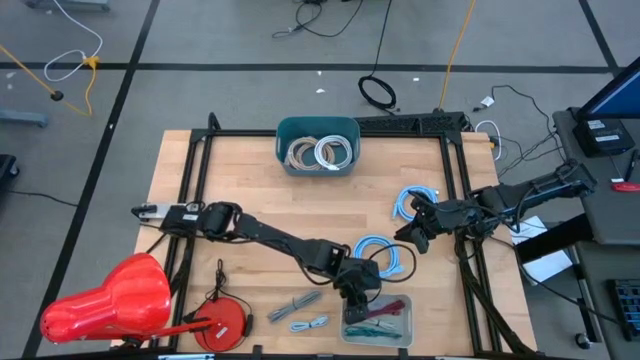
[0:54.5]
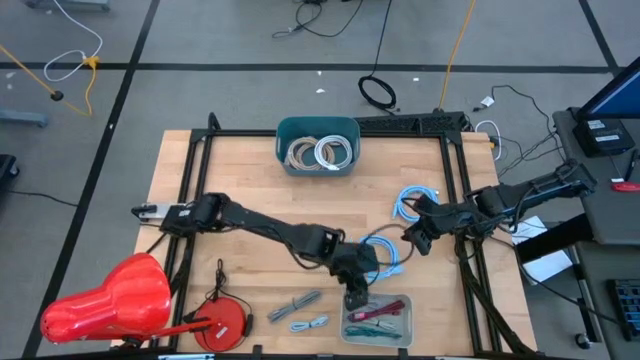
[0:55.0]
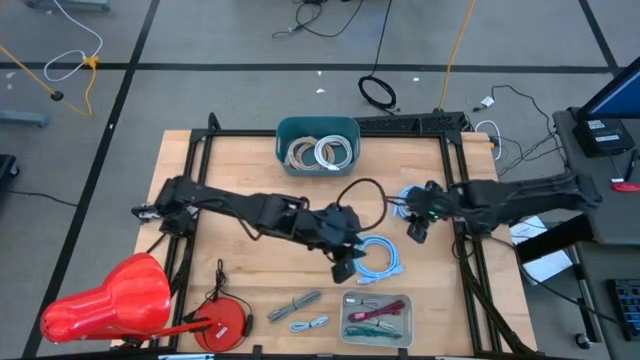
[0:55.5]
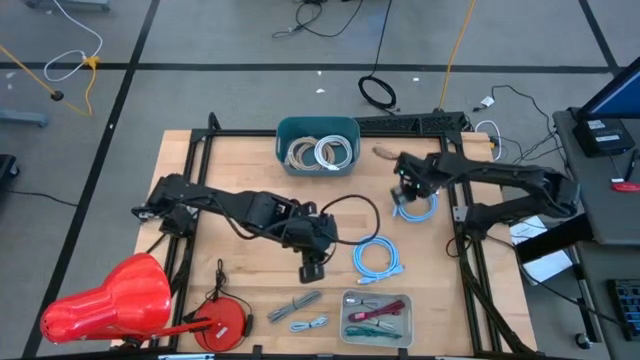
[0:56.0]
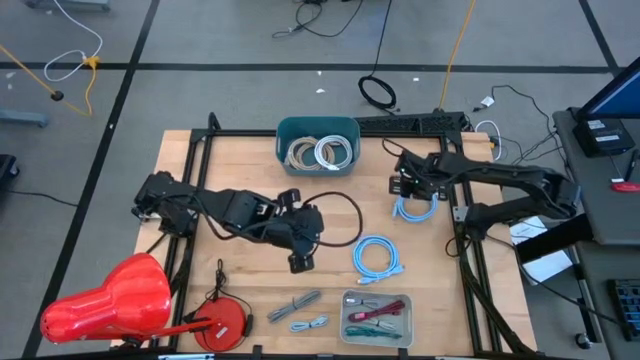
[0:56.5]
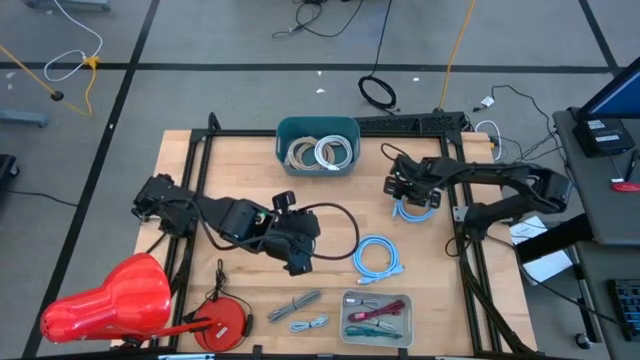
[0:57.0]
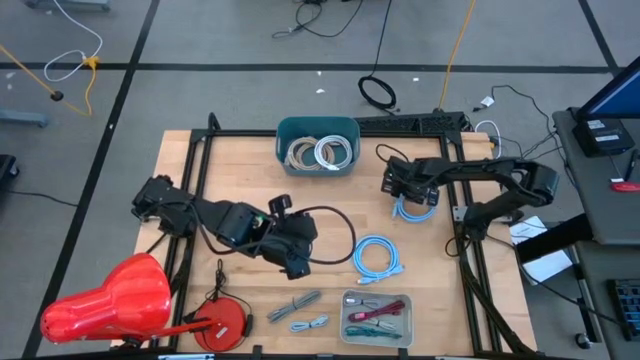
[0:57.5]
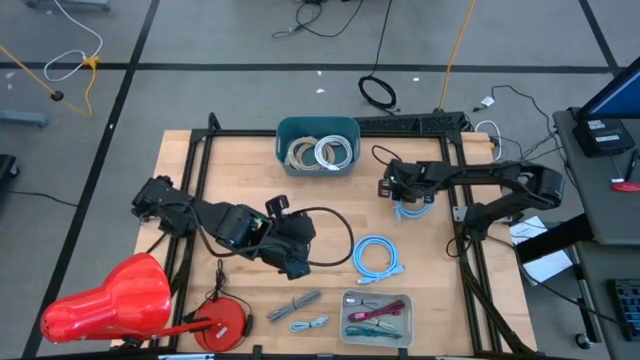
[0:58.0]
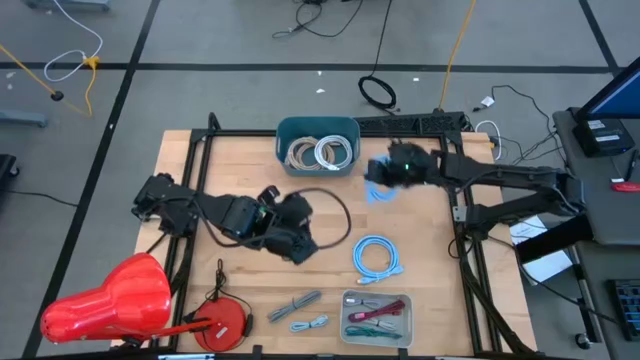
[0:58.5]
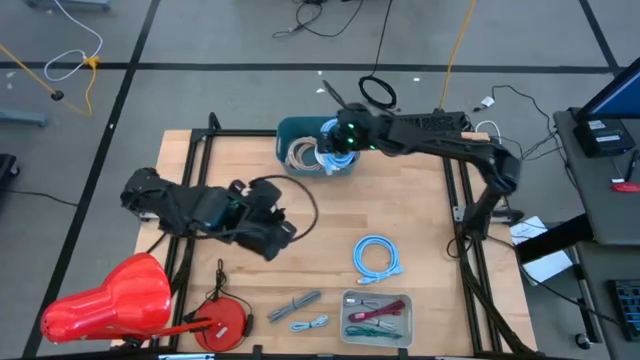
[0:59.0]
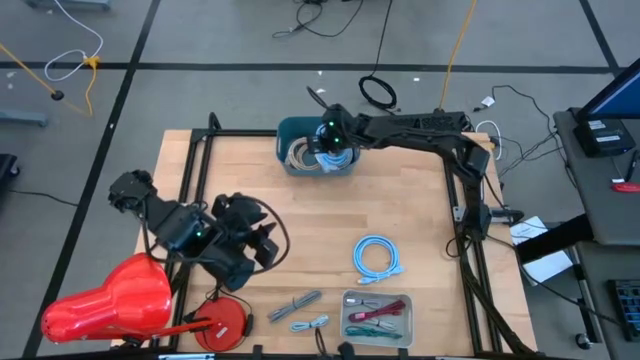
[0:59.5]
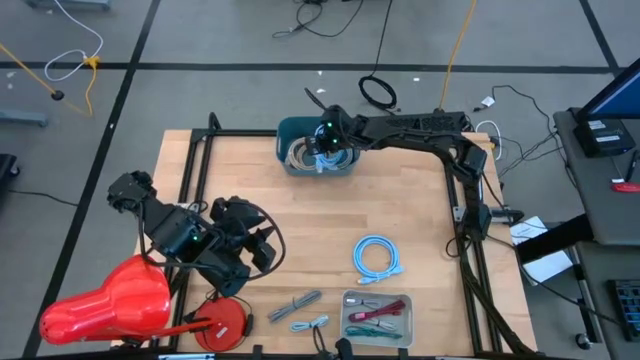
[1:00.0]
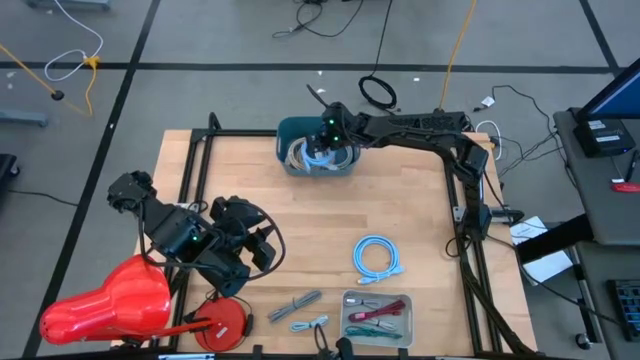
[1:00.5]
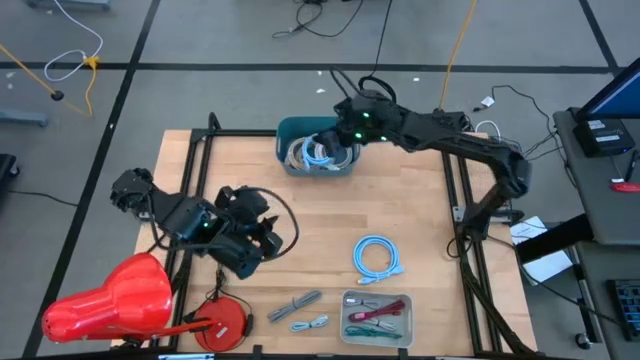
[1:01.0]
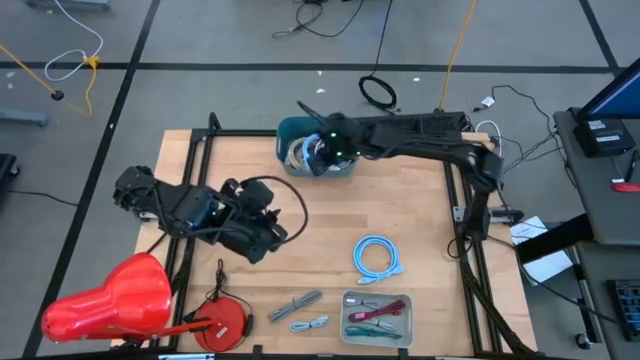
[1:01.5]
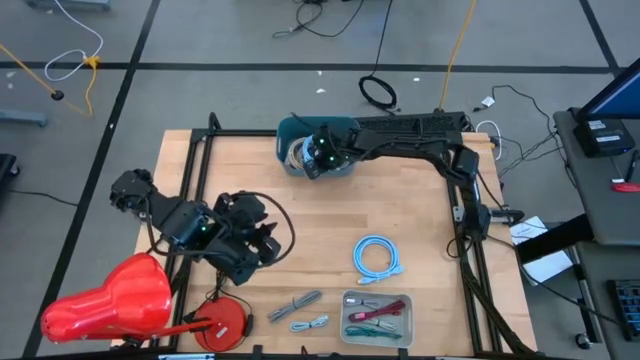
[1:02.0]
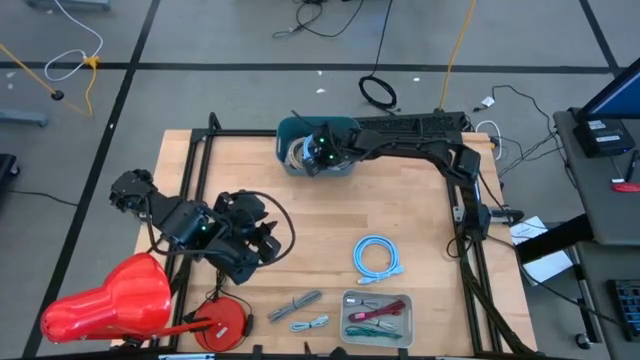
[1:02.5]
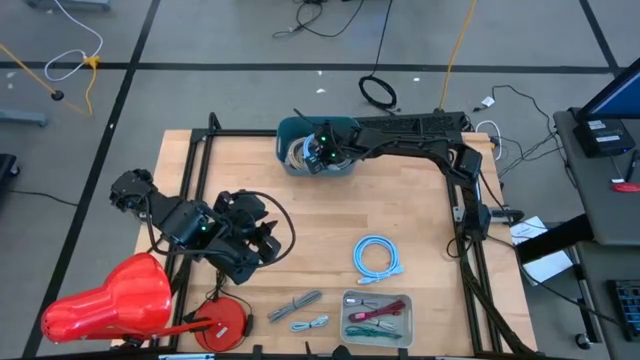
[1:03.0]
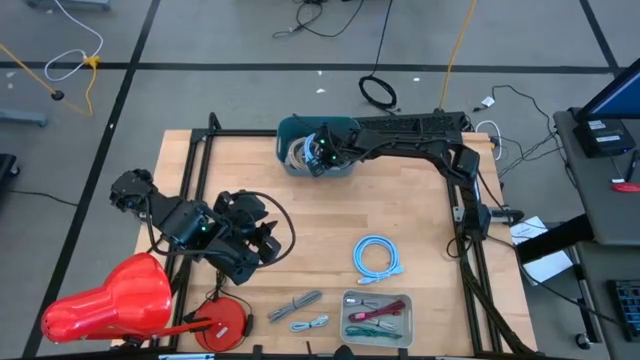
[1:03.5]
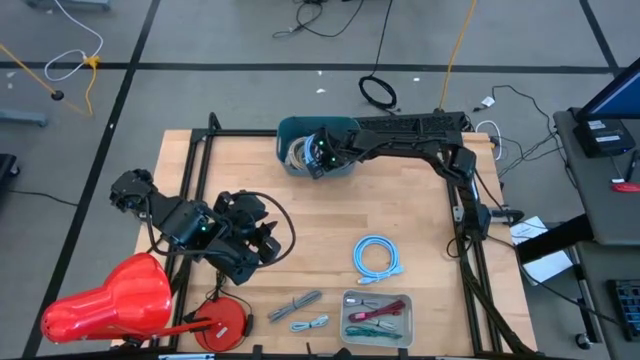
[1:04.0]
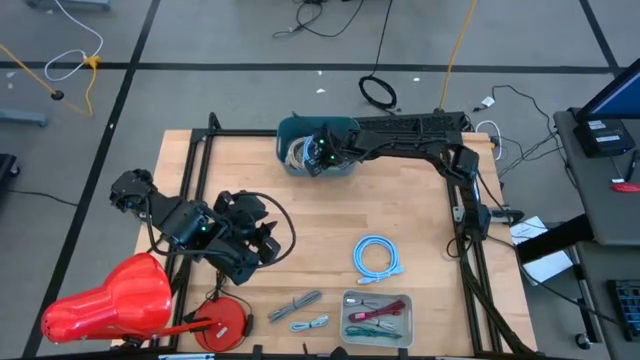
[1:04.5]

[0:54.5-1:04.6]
Task: Pick & Place USB Port
Put the top blue HDMI cable into the blue bin

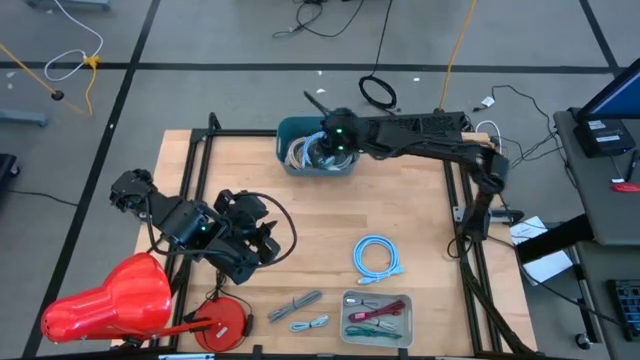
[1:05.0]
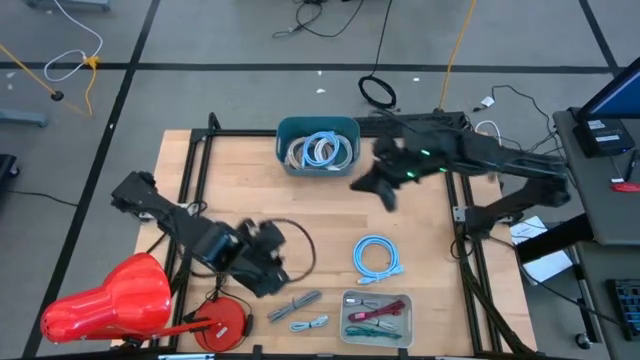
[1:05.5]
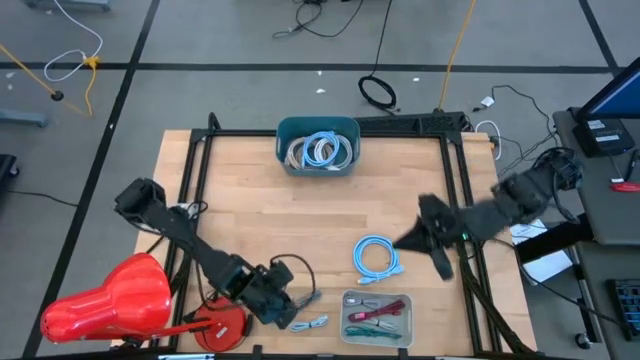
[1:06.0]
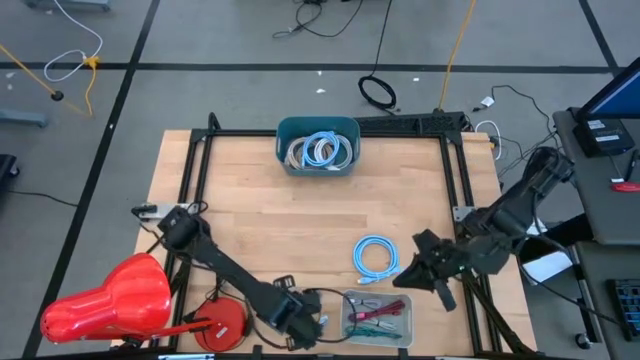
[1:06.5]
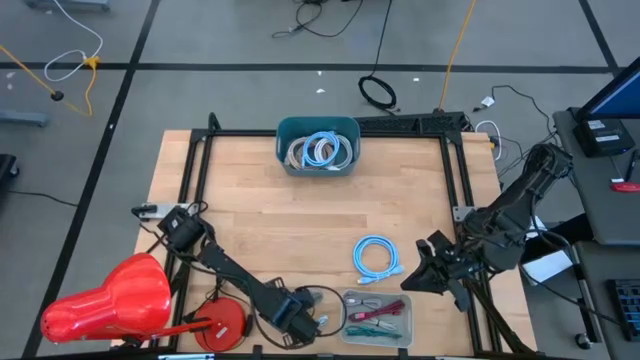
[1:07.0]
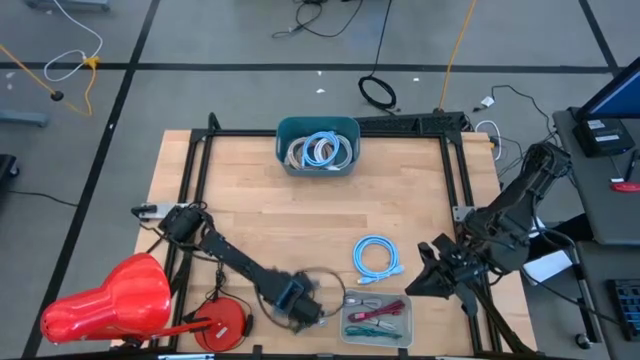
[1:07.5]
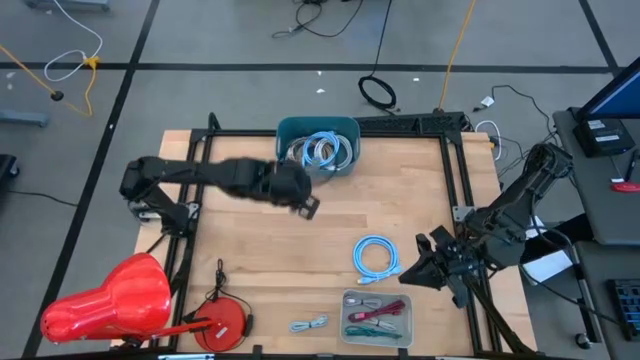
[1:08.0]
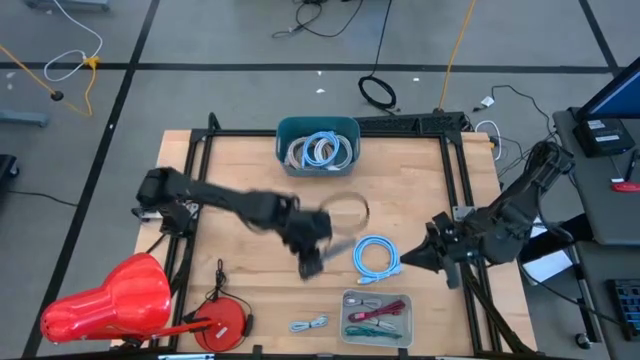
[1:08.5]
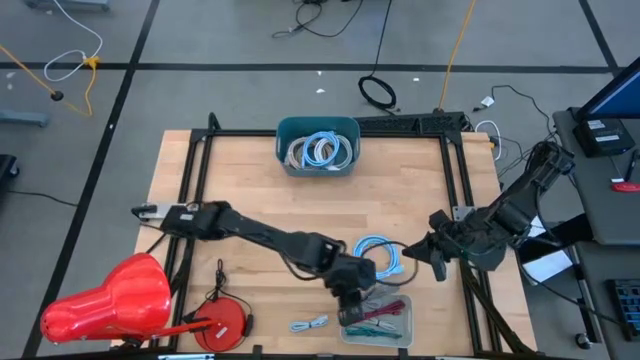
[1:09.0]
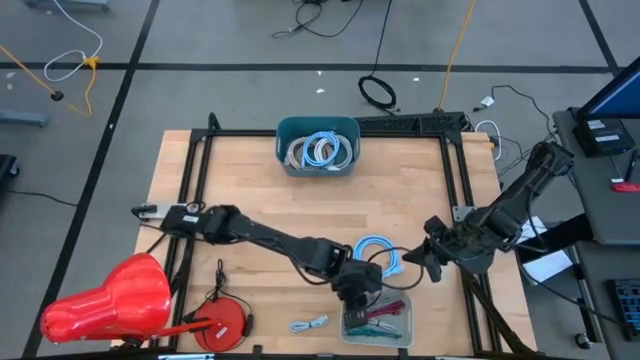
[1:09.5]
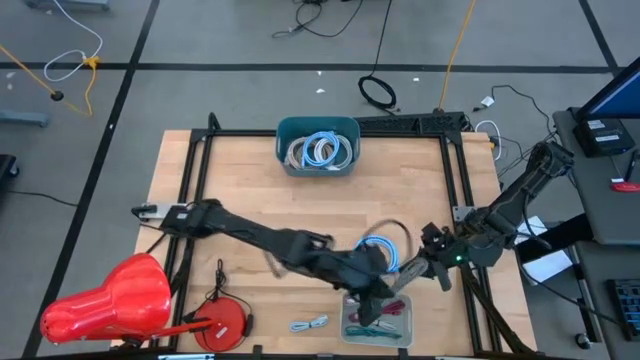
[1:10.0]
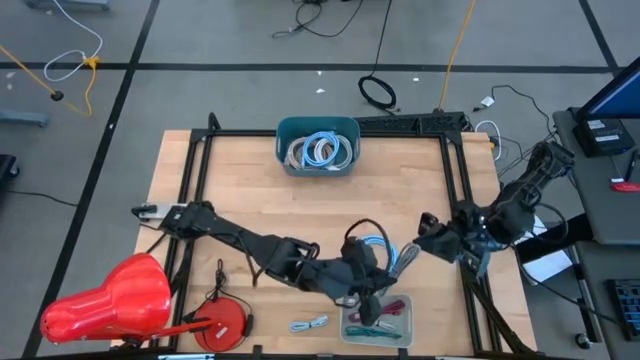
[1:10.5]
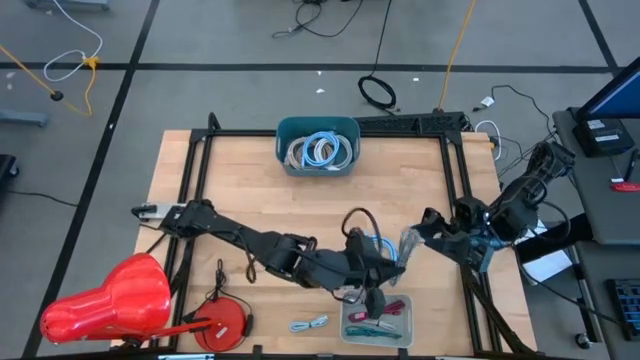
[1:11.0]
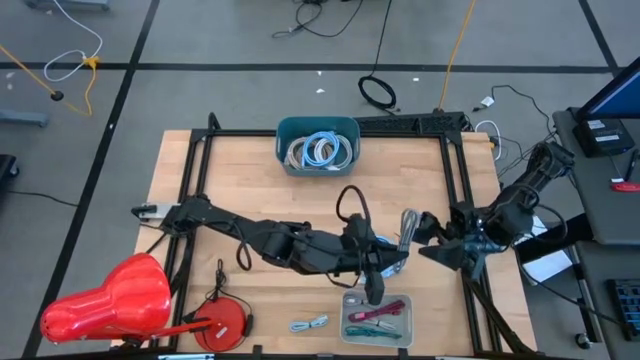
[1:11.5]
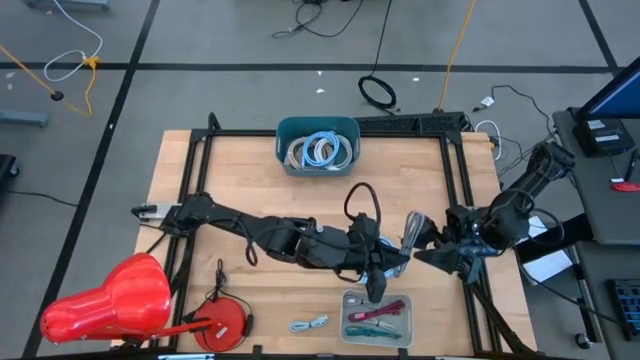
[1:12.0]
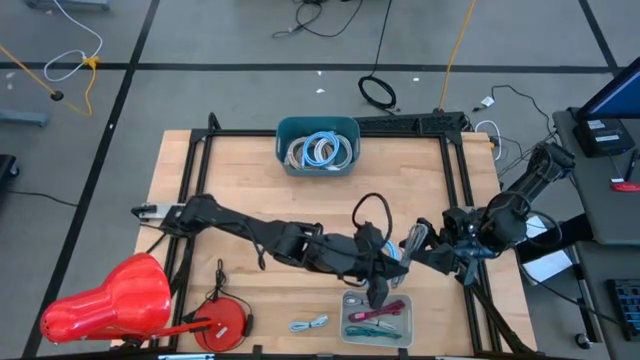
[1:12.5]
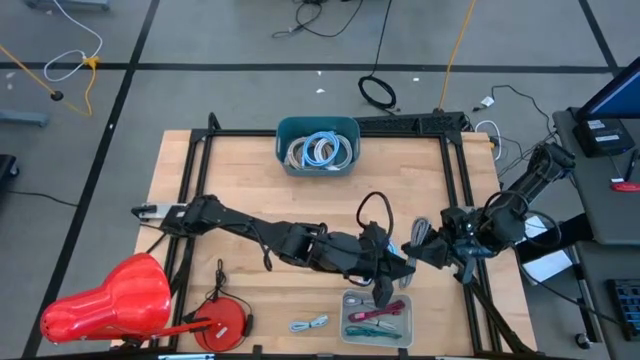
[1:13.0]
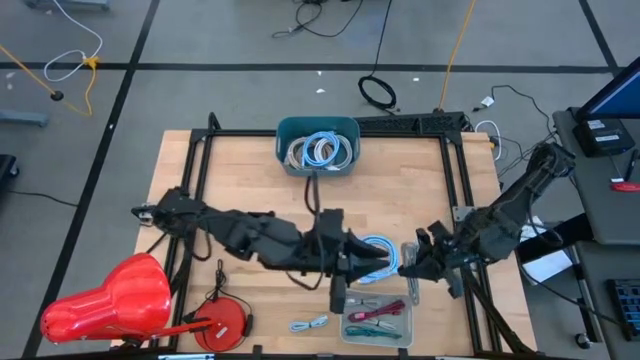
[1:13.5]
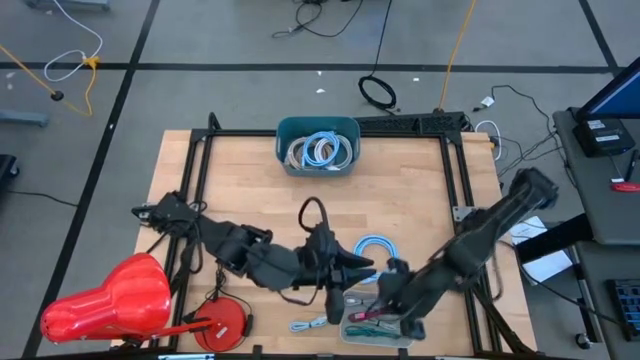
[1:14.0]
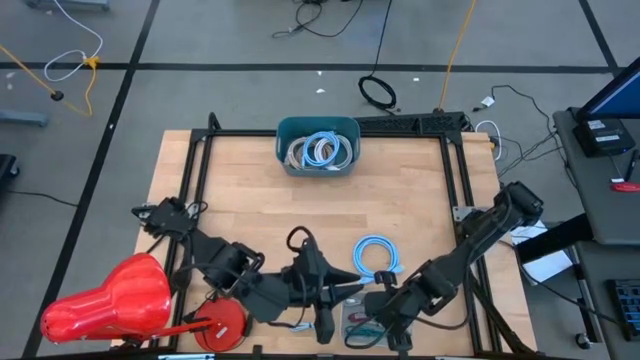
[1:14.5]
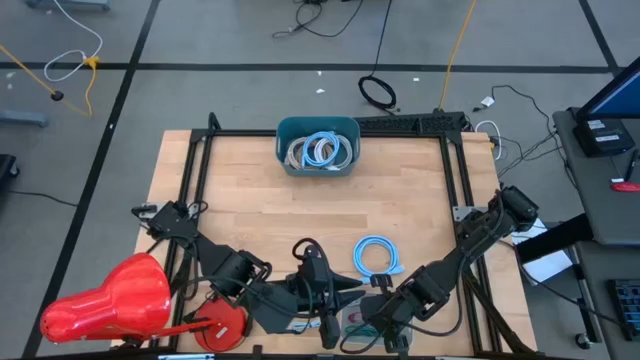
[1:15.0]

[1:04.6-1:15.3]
Put the white patterned charger cable into the gray bin

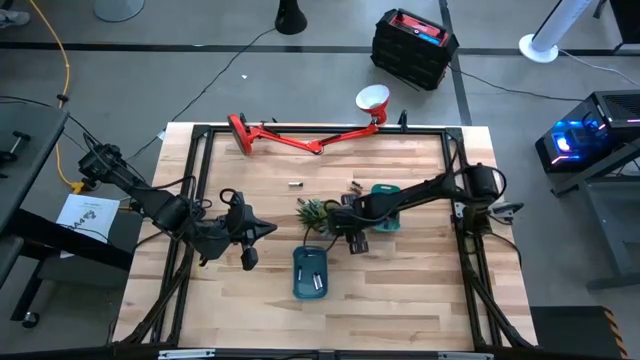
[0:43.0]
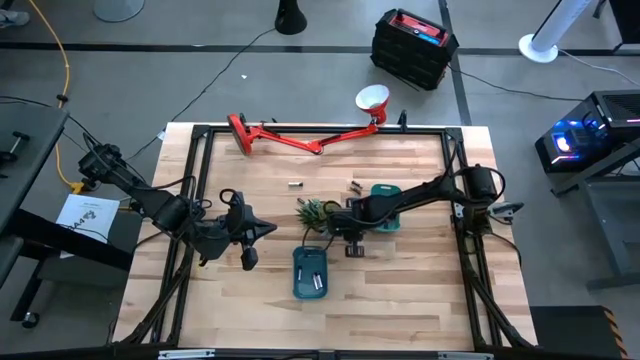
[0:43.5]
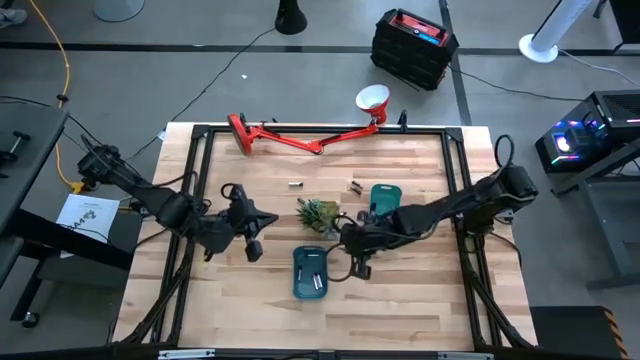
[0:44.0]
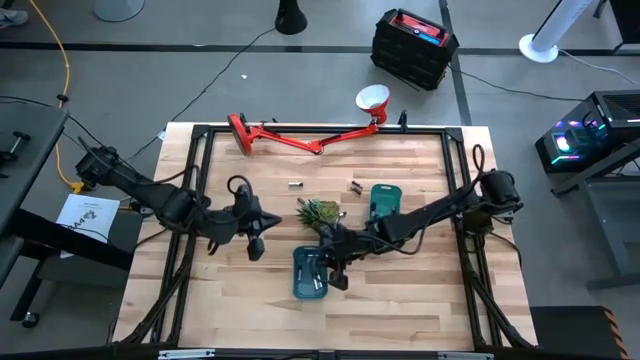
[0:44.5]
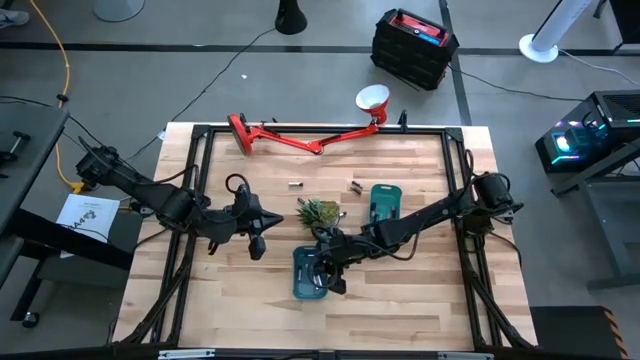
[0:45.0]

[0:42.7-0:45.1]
Task: Sort batteries
Put the silver battery into the blue bin
